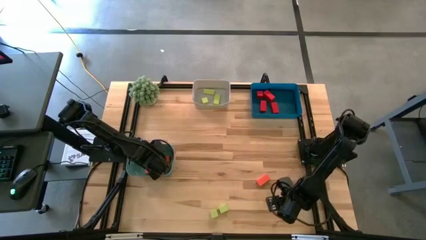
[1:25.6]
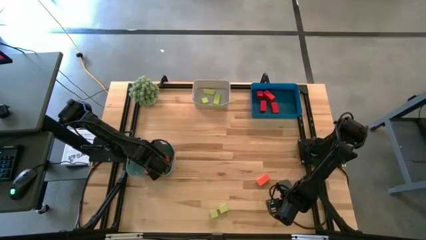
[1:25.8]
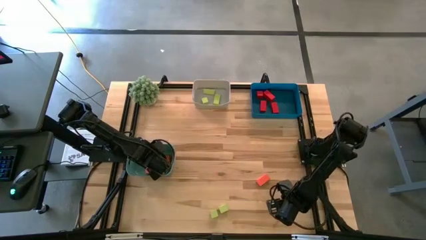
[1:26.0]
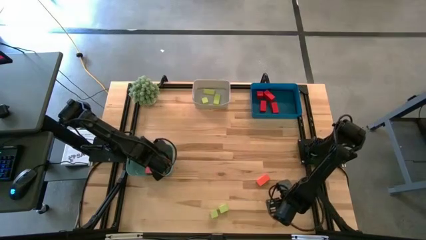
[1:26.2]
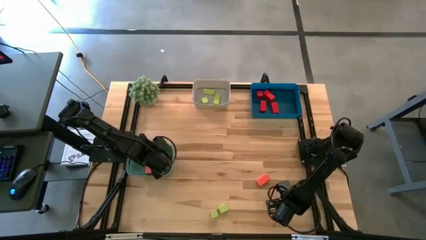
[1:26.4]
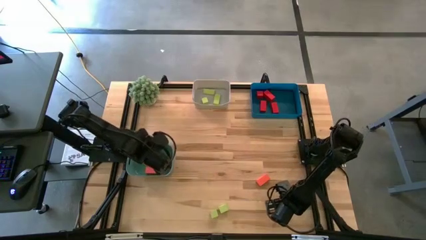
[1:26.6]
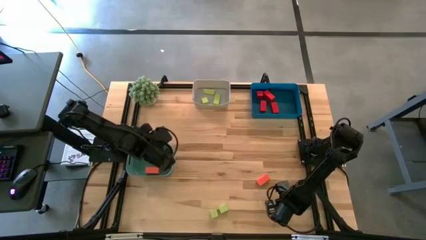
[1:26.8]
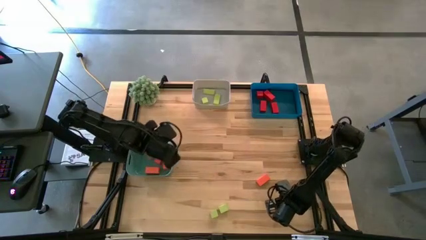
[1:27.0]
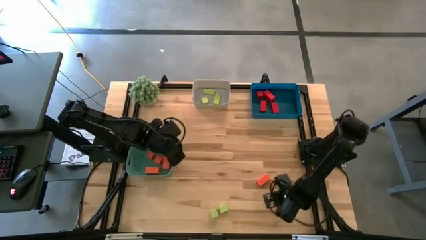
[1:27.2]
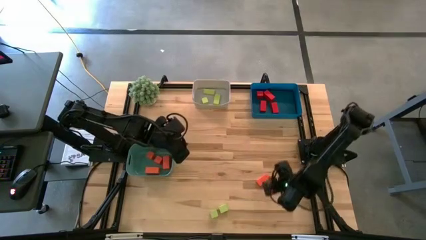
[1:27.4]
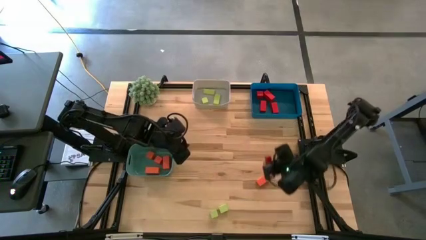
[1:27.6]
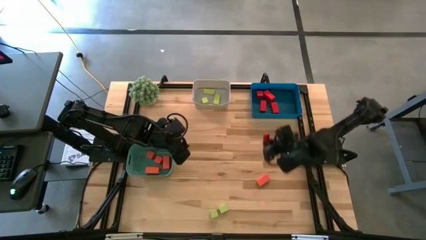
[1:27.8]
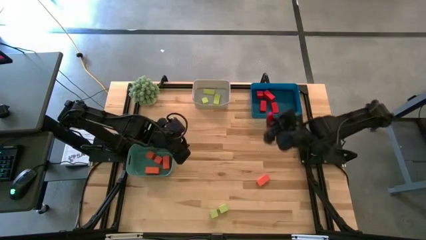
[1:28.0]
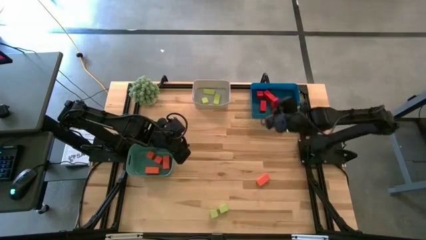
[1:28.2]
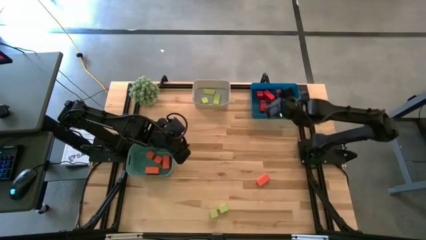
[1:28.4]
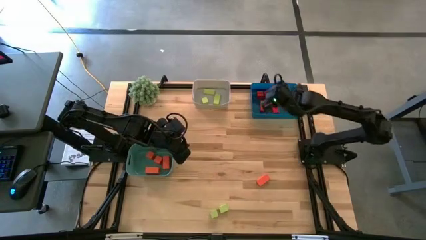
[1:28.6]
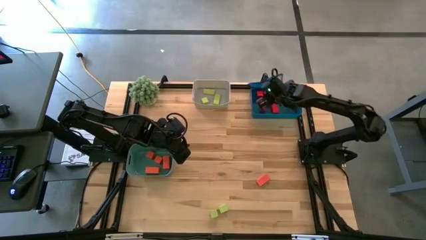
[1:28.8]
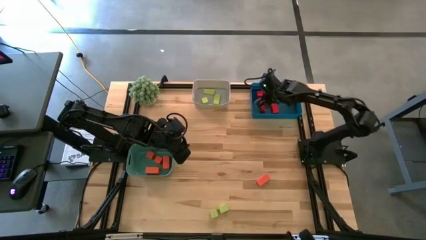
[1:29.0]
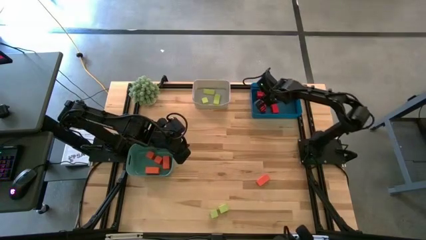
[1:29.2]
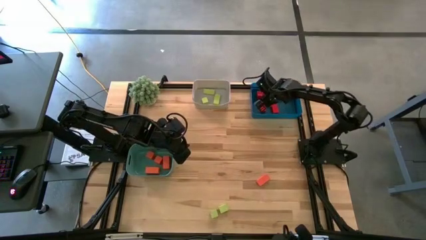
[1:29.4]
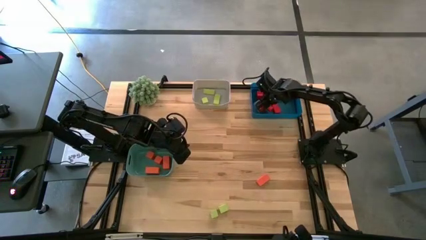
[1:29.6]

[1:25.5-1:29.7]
Task: Sort & place blocks by color
Put the red block into the blue bin

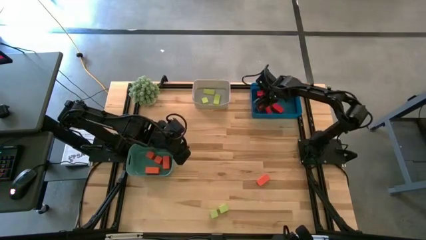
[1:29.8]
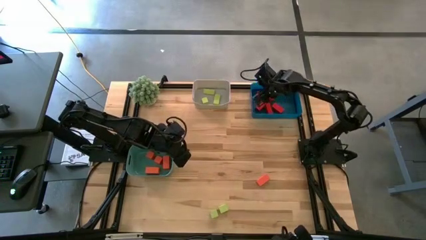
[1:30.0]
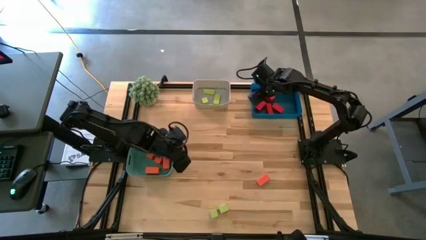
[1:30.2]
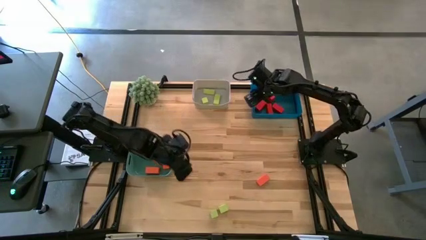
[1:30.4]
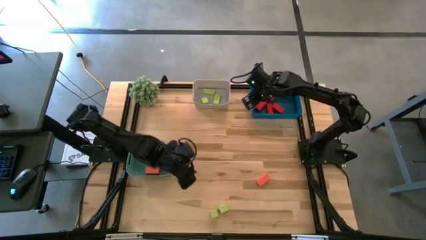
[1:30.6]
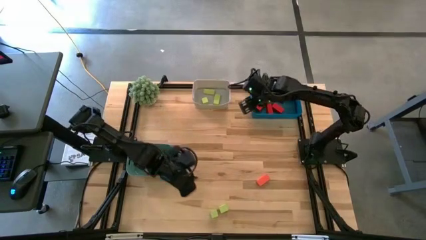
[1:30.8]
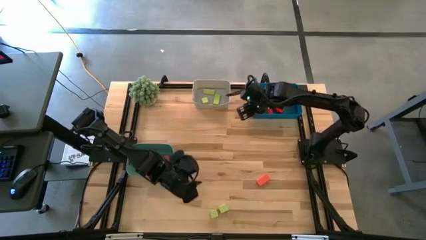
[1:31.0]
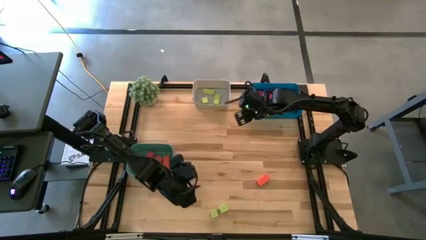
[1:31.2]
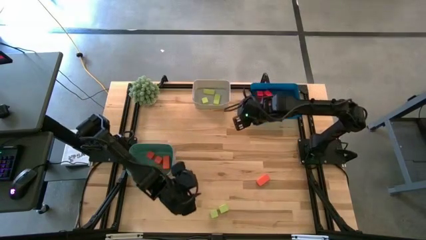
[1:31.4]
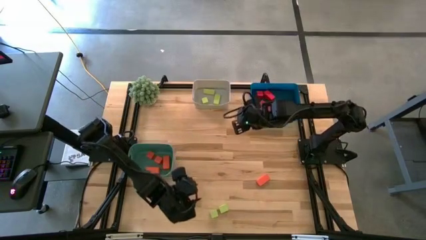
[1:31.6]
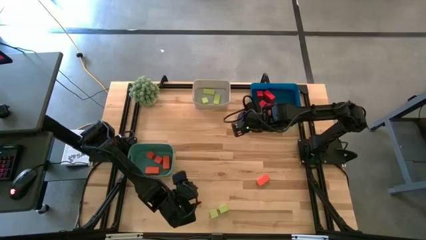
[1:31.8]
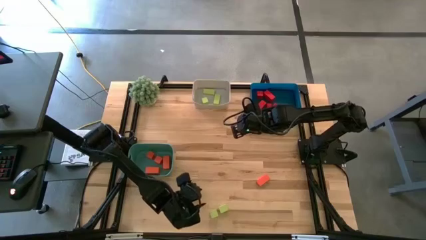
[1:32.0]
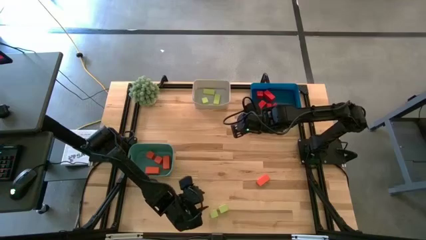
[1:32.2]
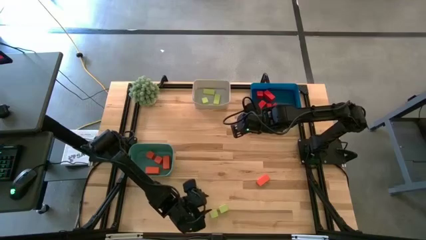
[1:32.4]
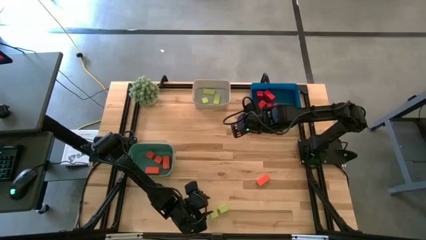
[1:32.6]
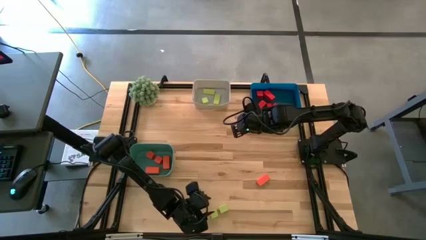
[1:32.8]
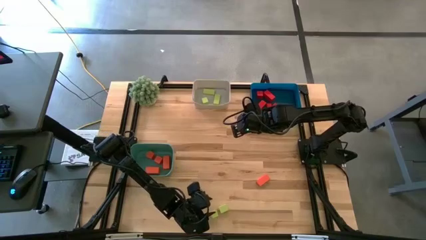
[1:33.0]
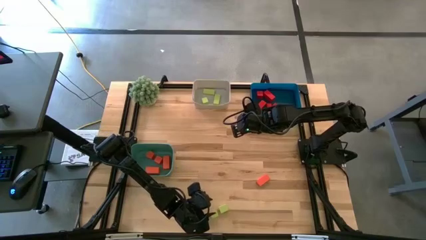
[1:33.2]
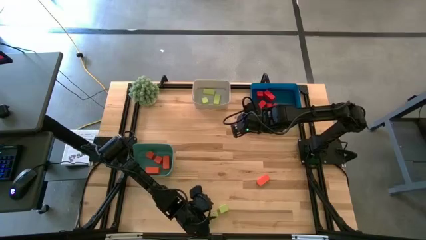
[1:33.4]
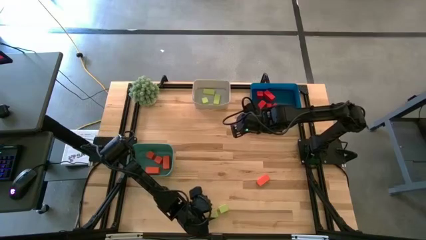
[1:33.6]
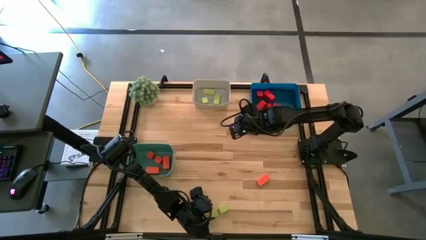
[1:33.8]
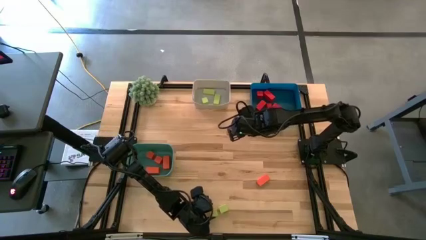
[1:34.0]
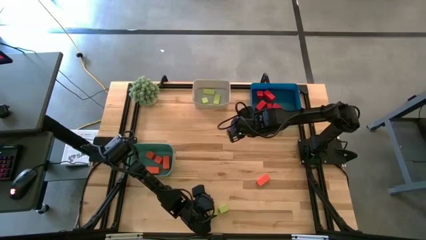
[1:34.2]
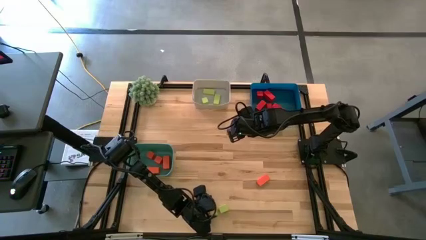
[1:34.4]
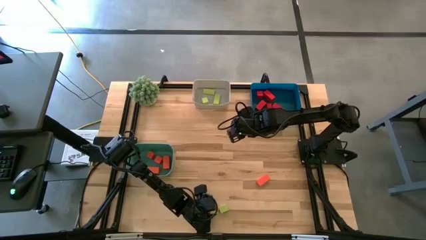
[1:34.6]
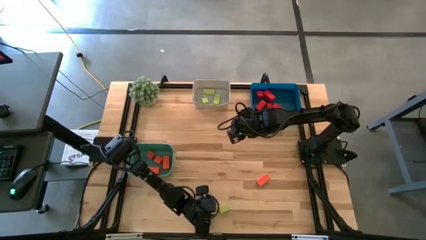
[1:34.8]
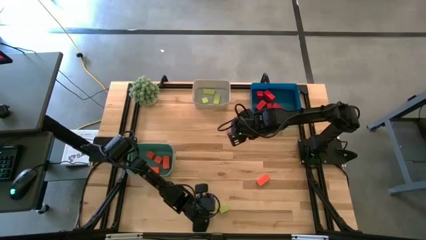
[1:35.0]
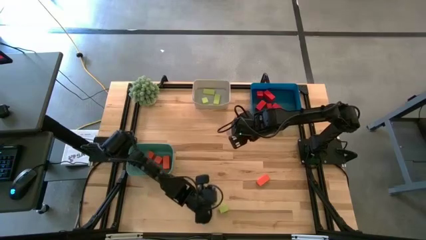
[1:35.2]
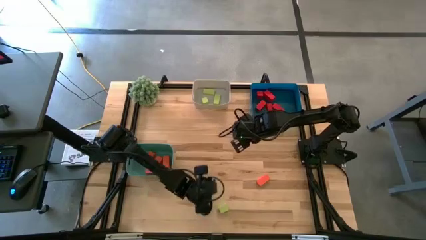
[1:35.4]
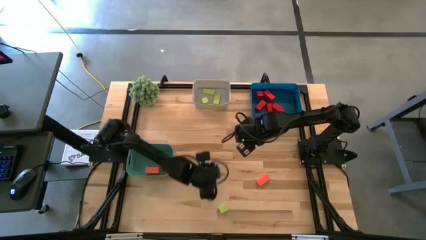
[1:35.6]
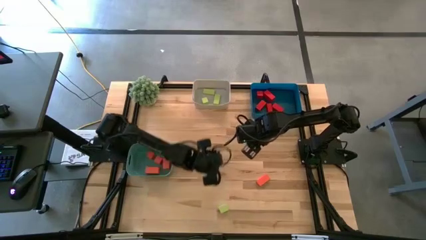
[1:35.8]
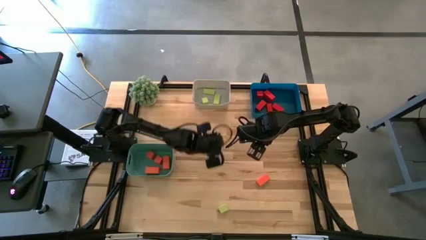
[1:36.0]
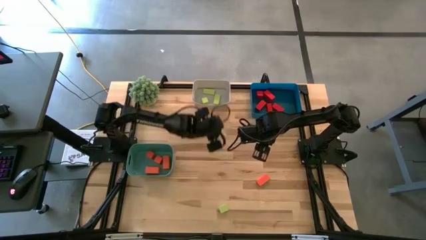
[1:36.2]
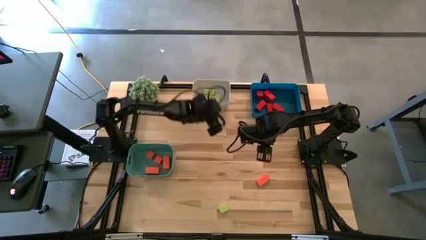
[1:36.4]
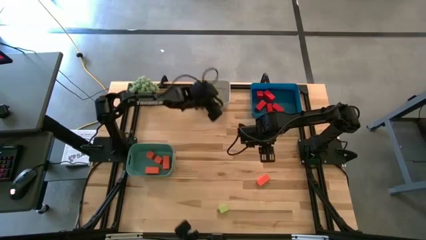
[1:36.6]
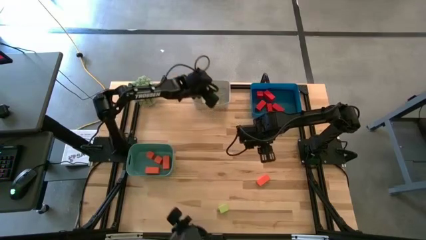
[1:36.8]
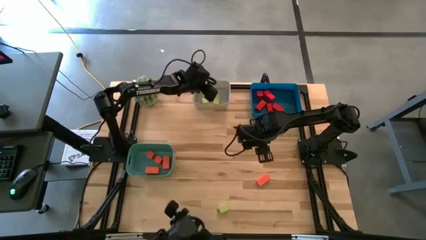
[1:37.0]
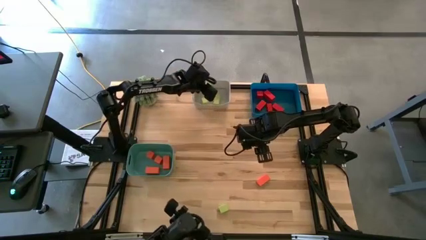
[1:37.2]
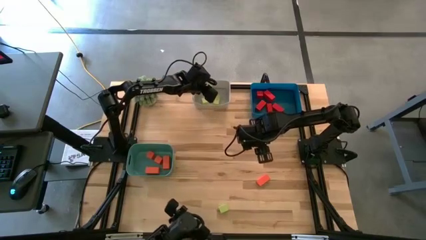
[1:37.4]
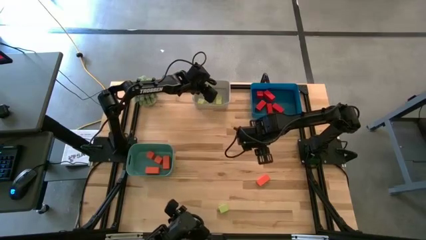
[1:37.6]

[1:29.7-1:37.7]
Put the green block into the gray bin
